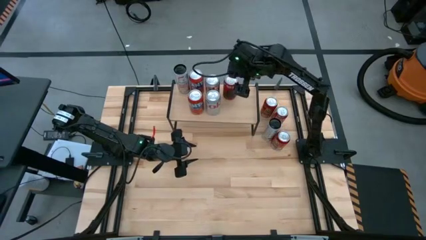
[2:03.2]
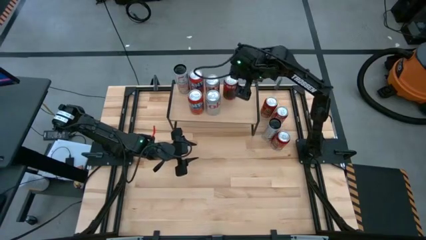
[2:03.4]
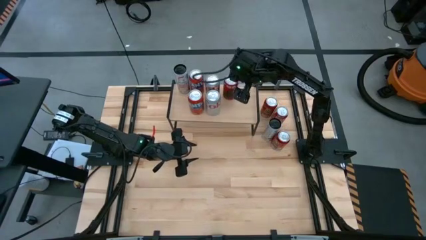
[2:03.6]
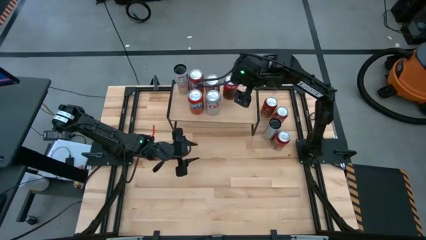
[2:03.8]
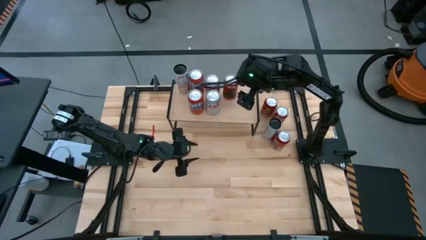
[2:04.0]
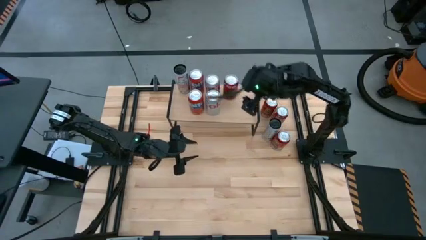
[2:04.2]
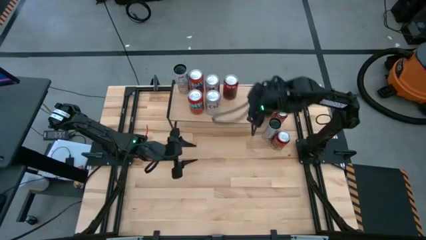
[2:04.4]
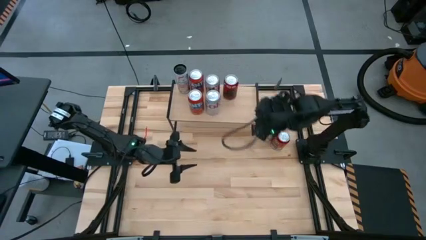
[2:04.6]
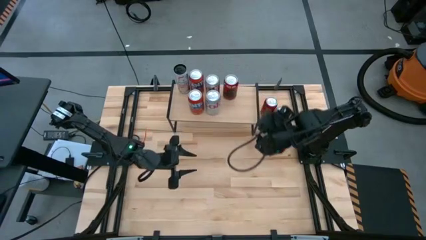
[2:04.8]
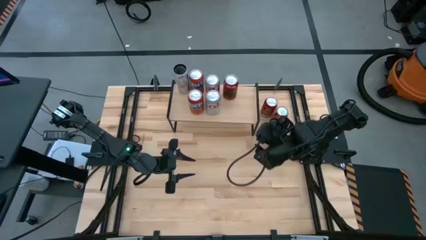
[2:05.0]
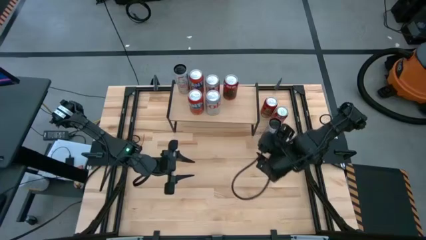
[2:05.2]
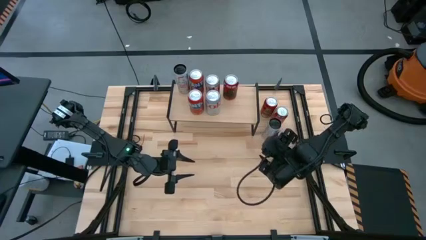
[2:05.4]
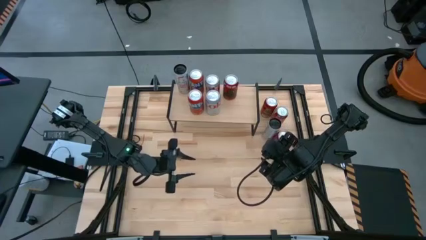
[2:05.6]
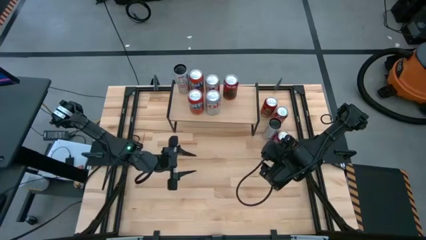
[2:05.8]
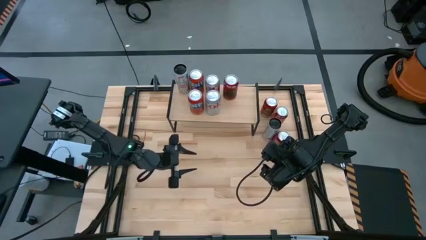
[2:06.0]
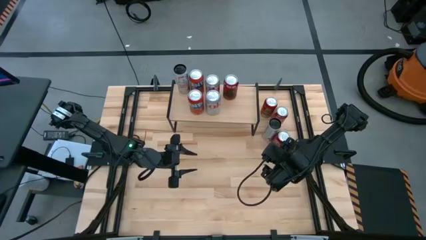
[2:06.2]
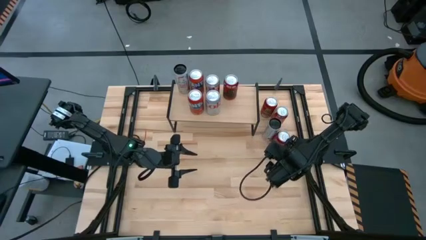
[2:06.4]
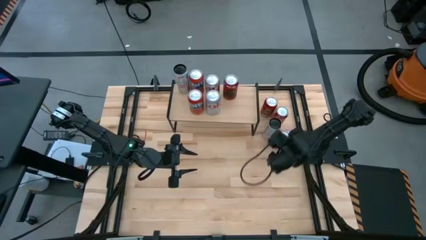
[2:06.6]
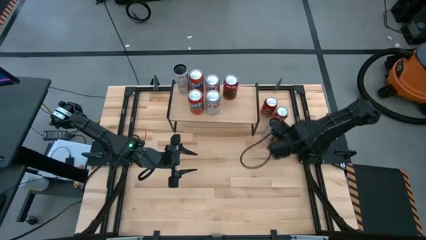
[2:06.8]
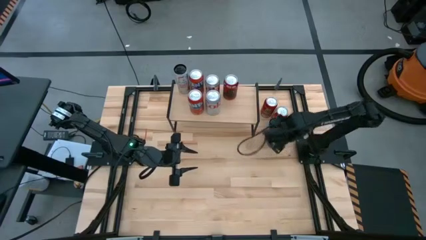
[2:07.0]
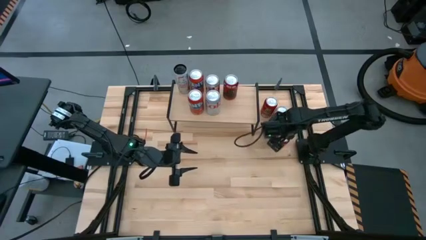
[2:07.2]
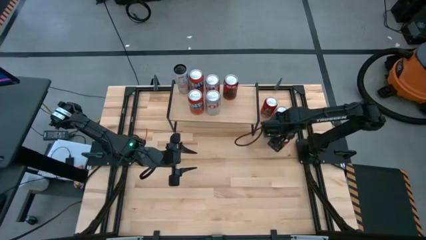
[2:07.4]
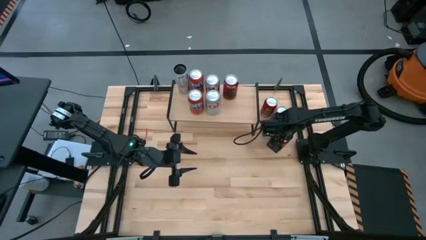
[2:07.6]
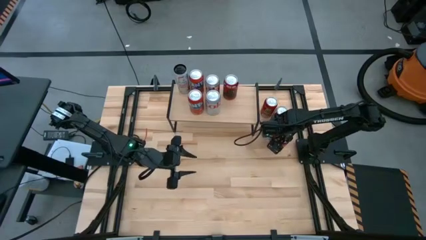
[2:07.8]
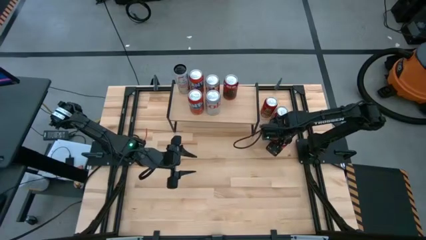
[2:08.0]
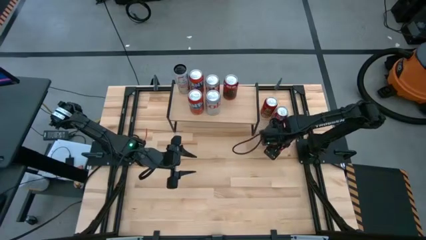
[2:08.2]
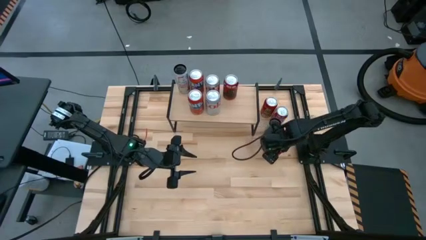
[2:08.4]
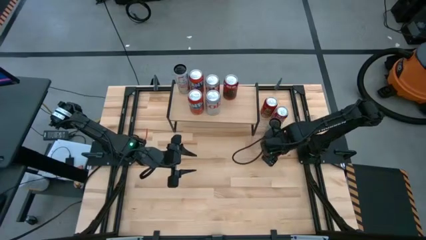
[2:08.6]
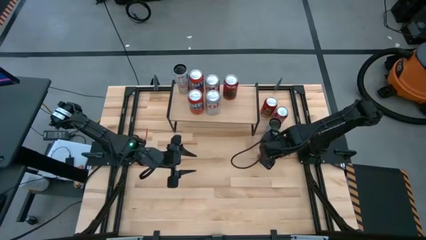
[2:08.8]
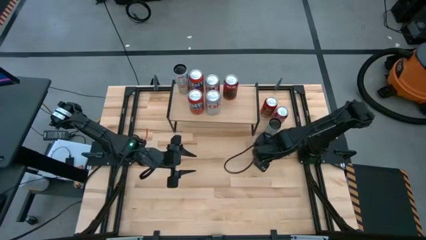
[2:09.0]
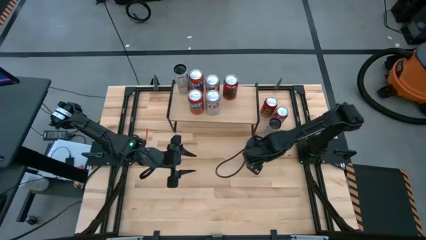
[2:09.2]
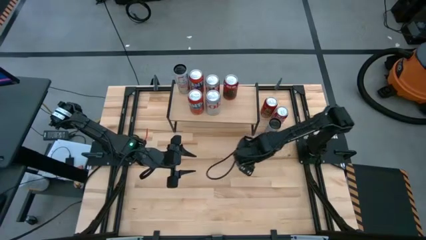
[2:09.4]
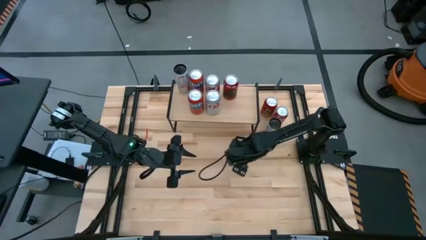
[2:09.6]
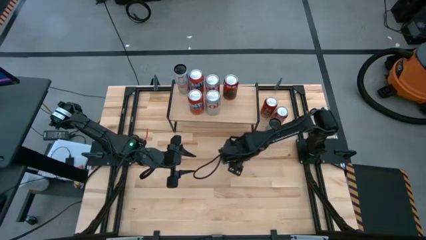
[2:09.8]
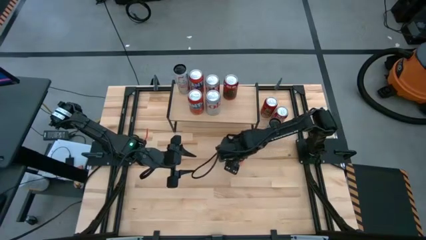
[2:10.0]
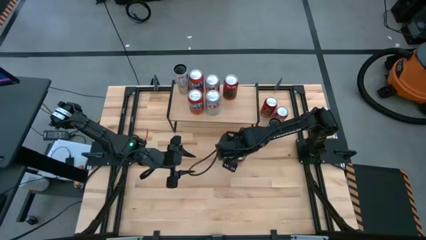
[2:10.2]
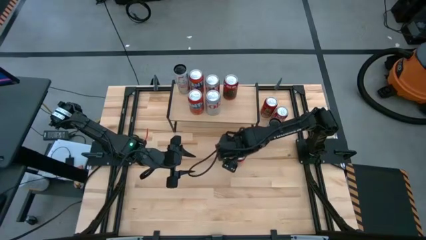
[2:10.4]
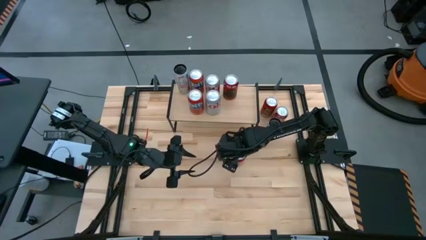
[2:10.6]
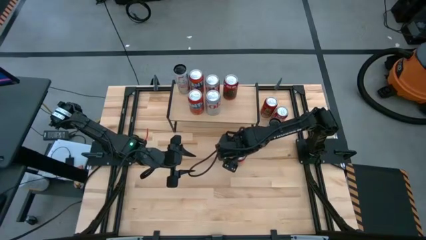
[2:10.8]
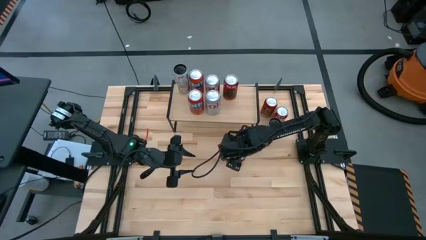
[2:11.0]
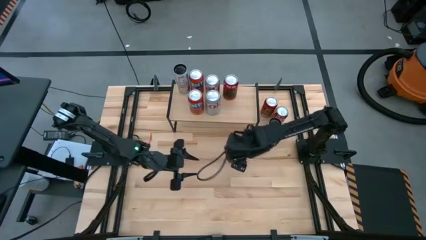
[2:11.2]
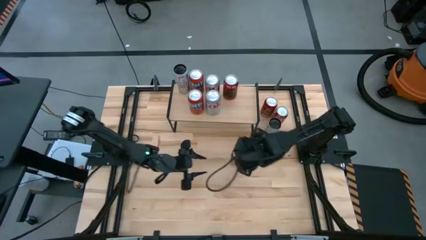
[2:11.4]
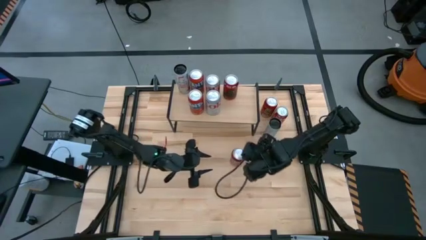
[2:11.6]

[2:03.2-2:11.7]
Task: Place canned beverage on shelf
Move the bottom red and black soda can to the center of the table

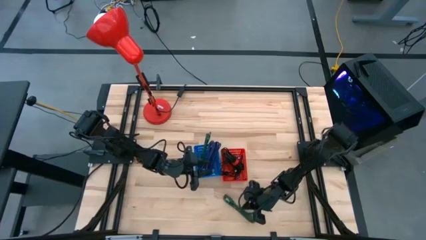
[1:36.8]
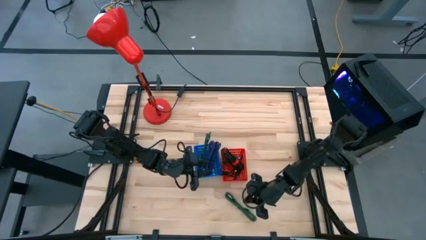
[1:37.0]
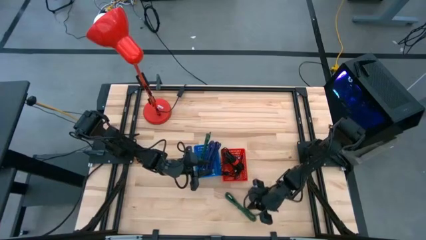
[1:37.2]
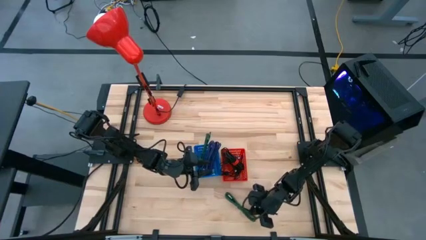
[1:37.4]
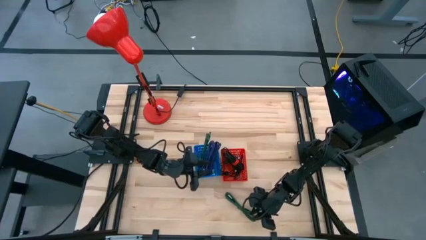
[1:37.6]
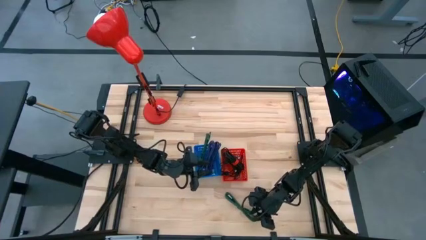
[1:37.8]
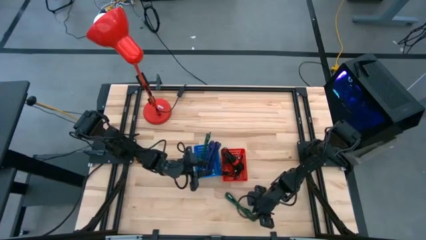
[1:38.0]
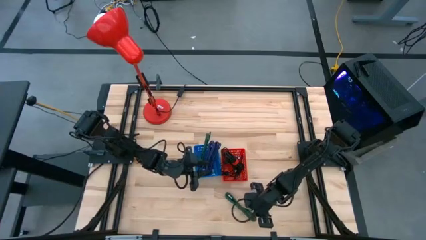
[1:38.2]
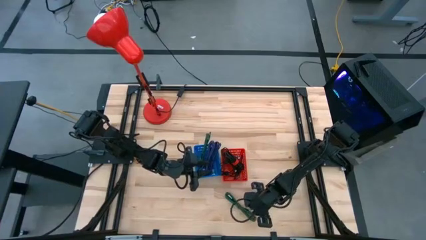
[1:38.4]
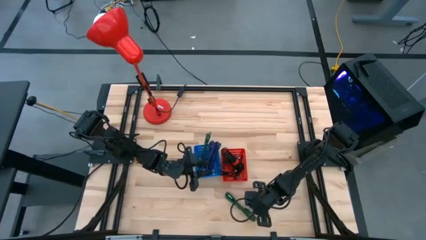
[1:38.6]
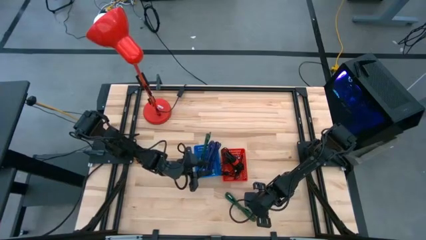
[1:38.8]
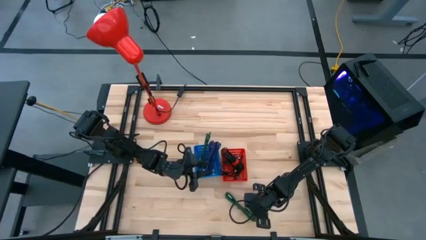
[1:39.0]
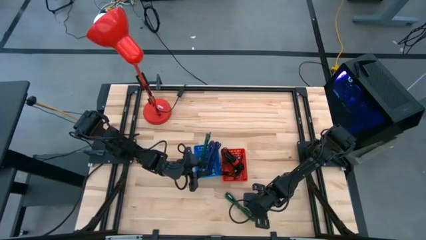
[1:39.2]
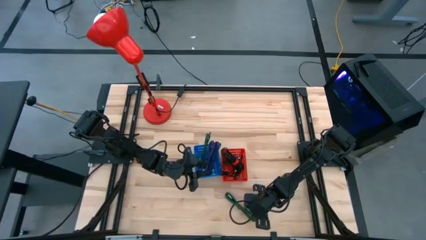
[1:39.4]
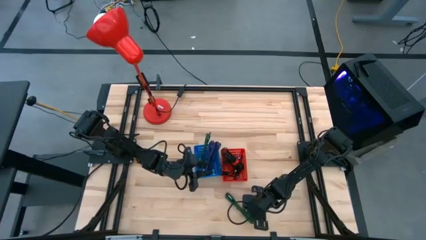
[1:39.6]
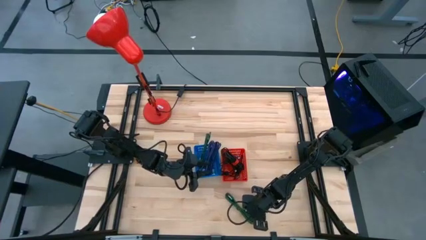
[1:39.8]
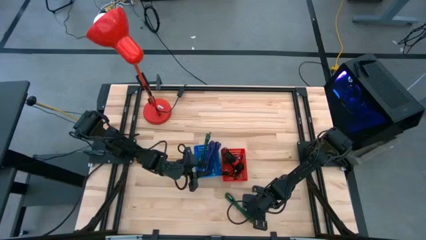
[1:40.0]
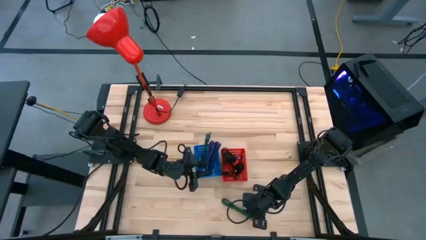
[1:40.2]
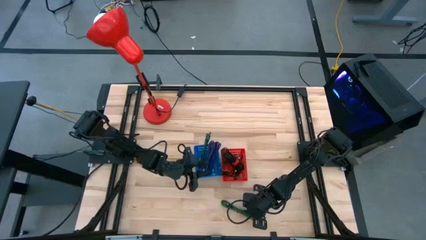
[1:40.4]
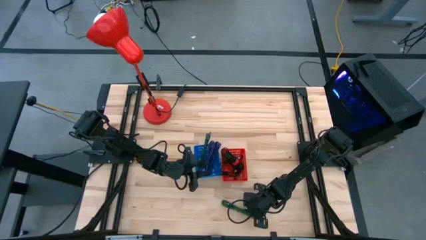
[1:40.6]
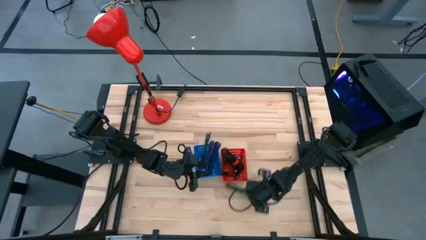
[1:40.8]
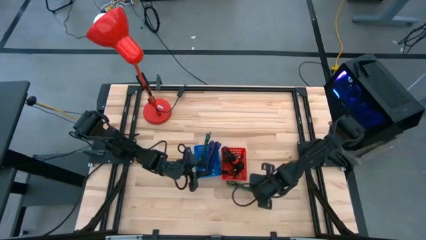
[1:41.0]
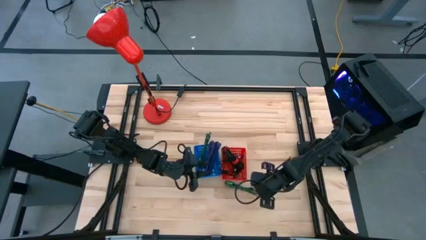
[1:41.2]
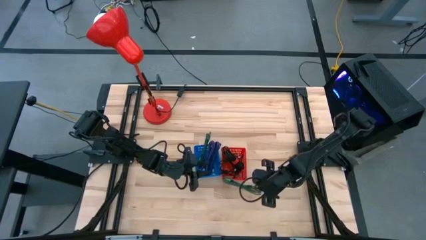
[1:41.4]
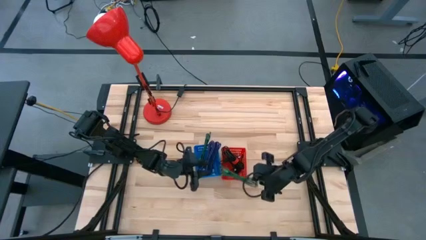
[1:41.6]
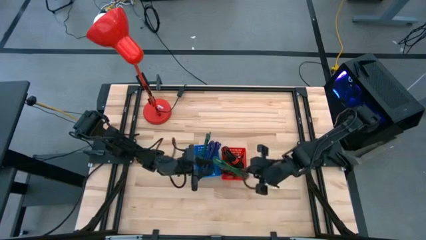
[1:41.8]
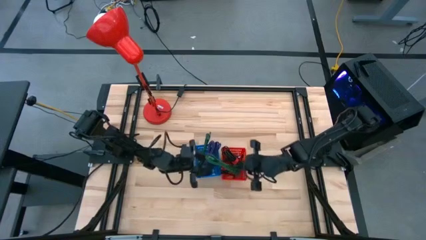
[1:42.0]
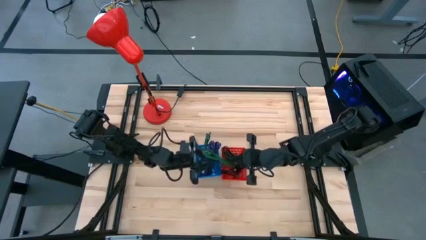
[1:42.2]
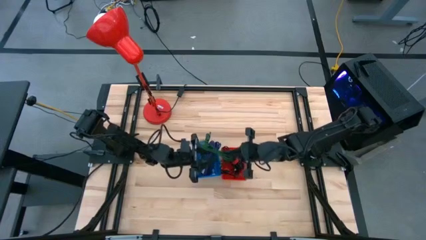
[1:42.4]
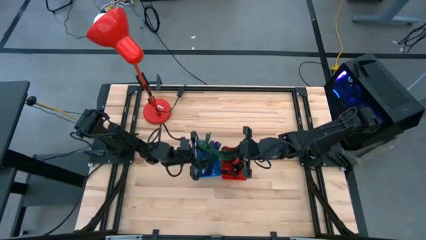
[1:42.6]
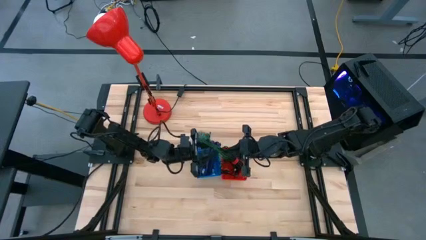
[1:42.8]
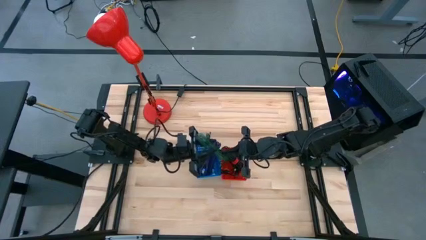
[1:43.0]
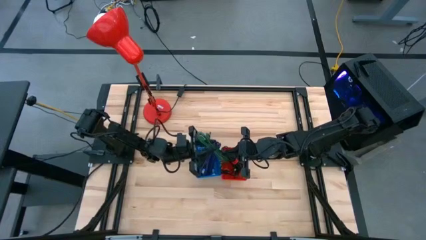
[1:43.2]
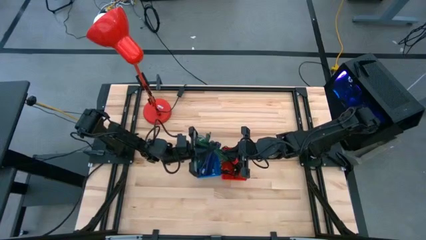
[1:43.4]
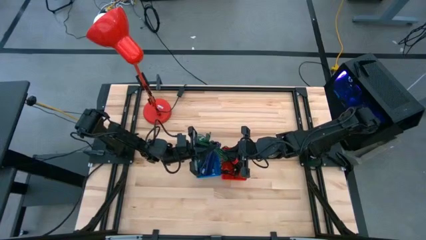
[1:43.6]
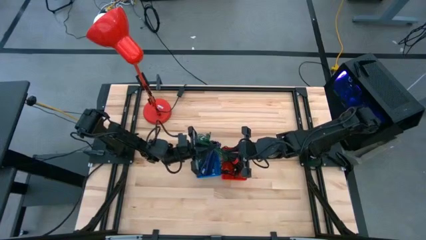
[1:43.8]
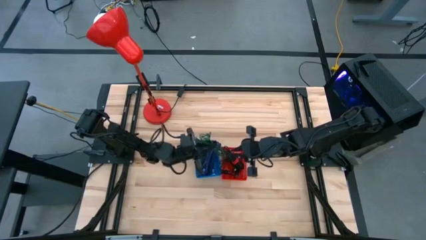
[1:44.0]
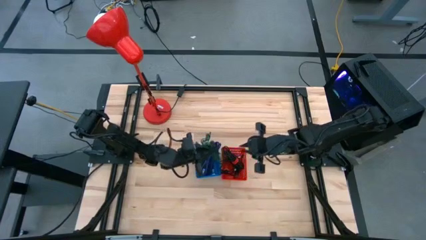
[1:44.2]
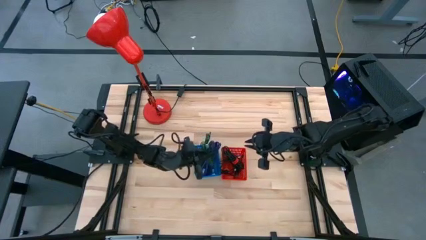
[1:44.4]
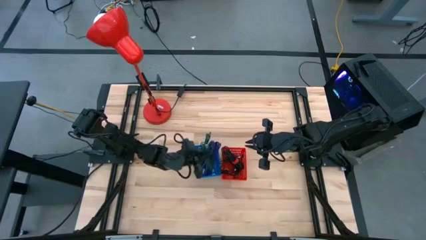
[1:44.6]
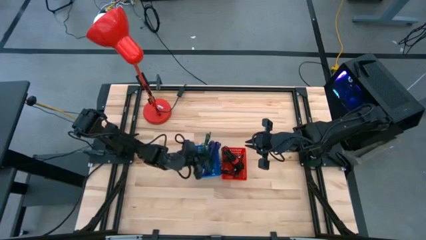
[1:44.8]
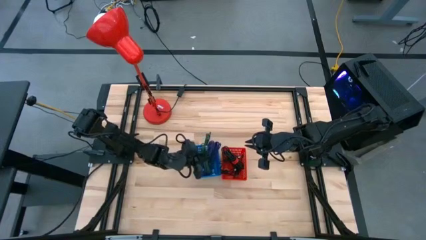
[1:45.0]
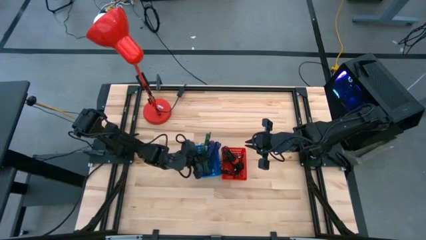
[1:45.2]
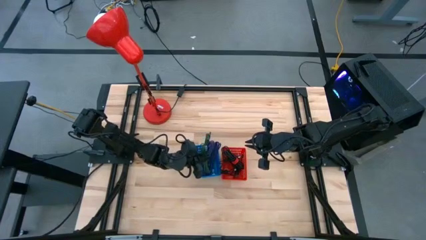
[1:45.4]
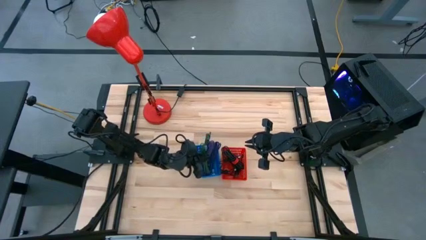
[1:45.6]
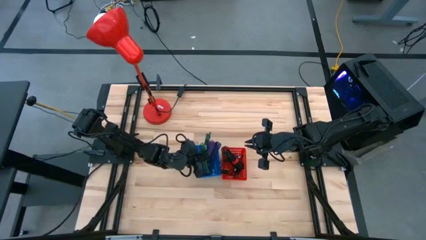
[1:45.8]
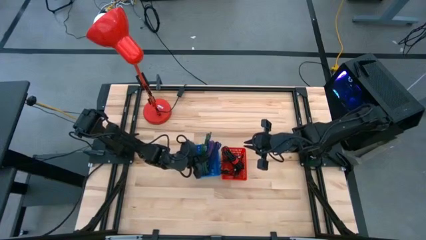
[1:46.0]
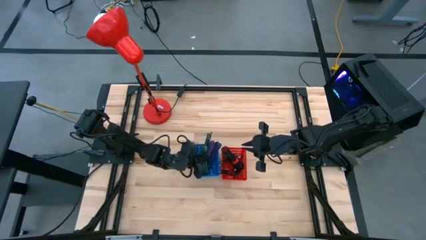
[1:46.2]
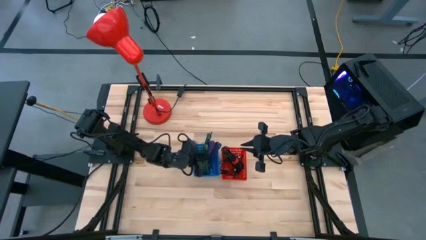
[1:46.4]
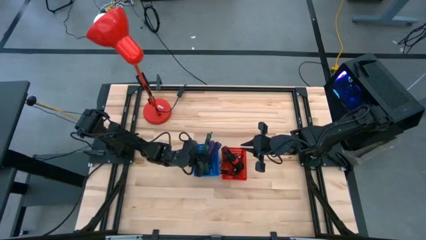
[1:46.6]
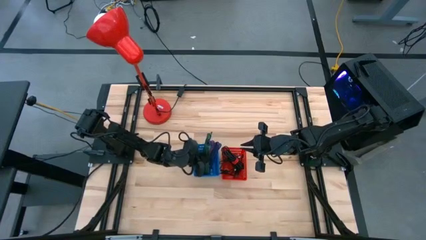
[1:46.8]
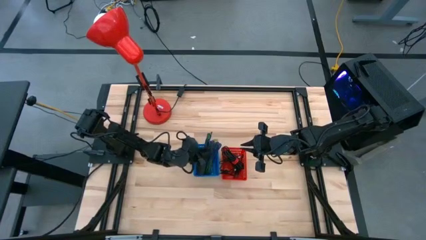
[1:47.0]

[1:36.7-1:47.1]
Task: Pick & Place USB Port
Put the green charger cable into the blue bin
